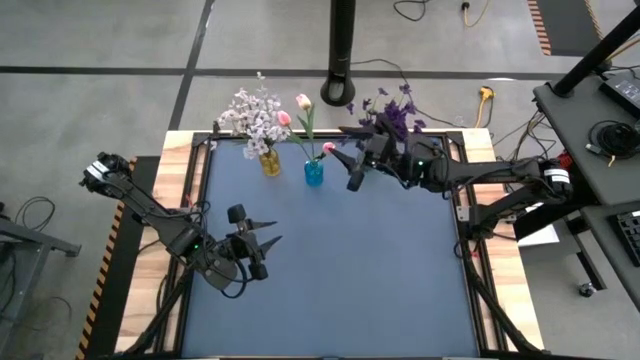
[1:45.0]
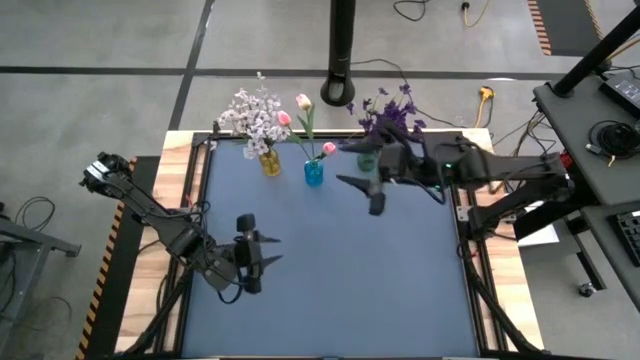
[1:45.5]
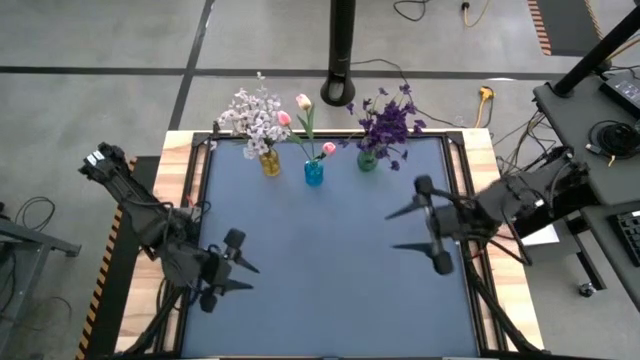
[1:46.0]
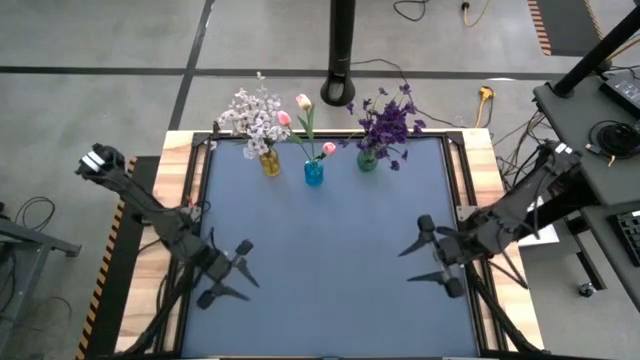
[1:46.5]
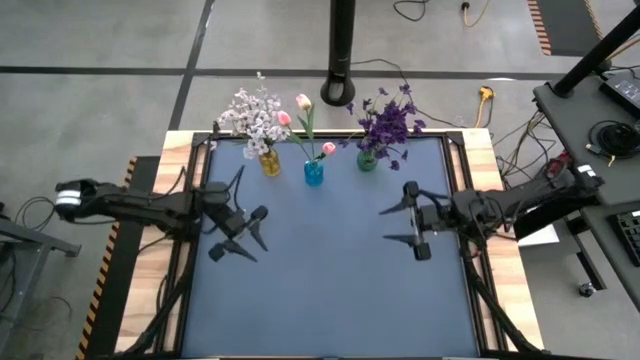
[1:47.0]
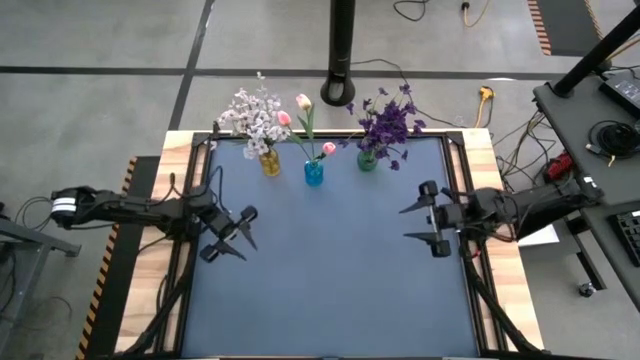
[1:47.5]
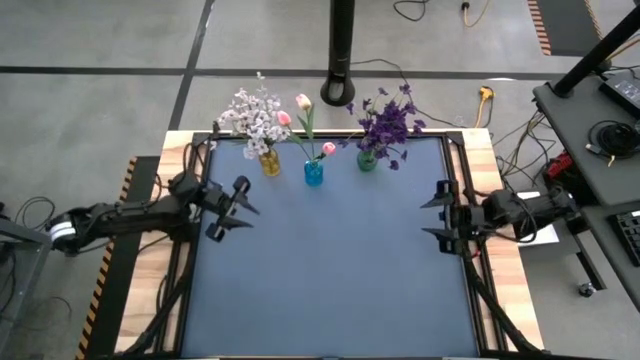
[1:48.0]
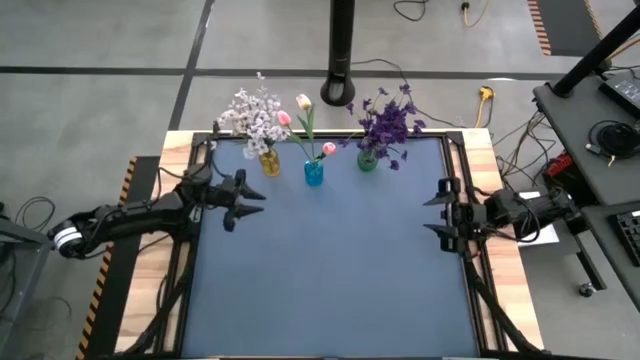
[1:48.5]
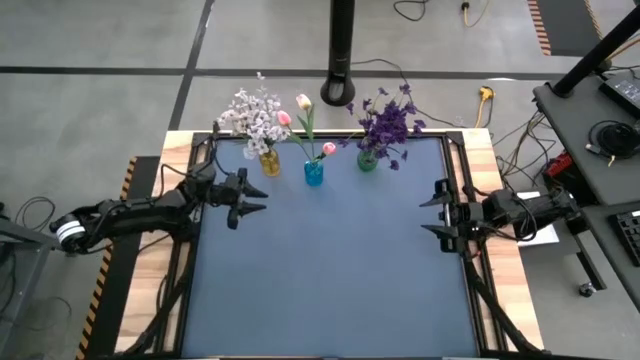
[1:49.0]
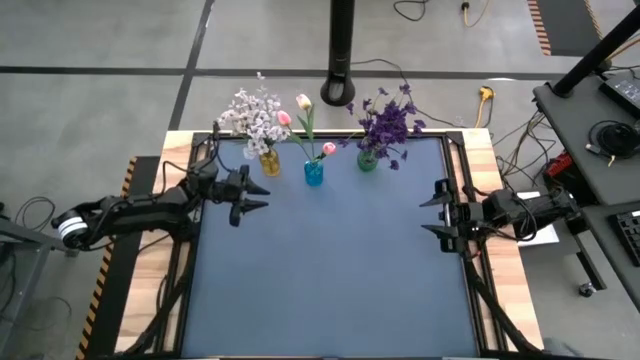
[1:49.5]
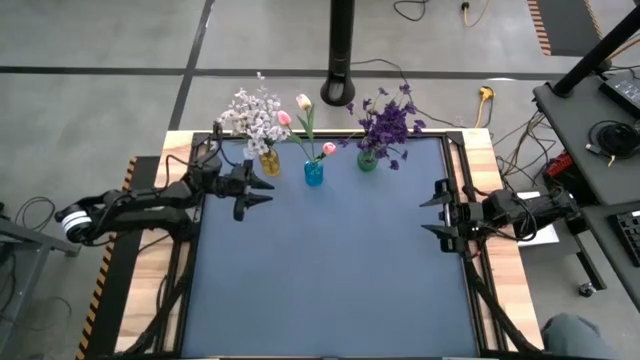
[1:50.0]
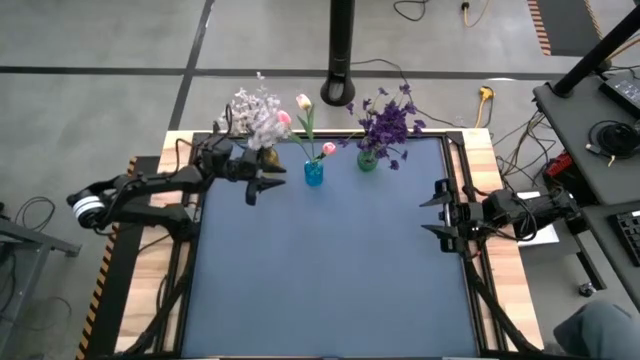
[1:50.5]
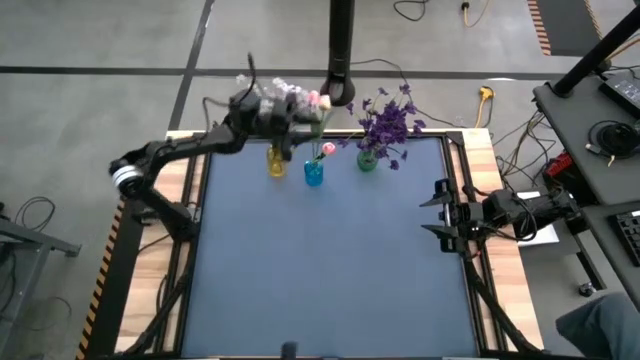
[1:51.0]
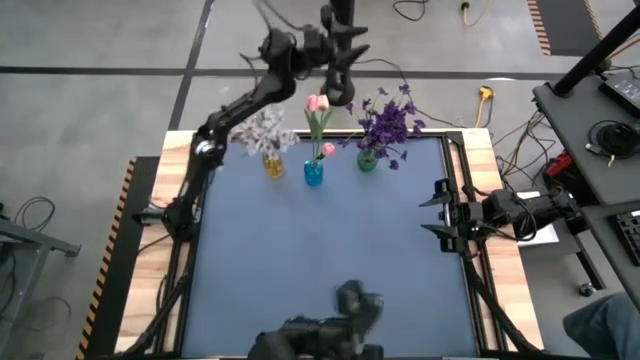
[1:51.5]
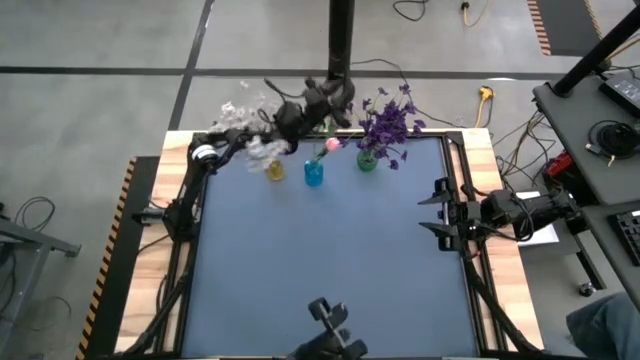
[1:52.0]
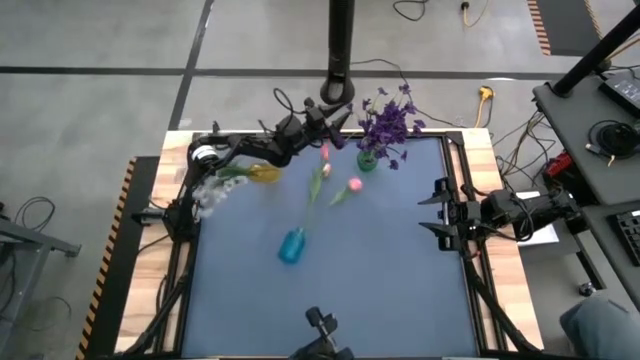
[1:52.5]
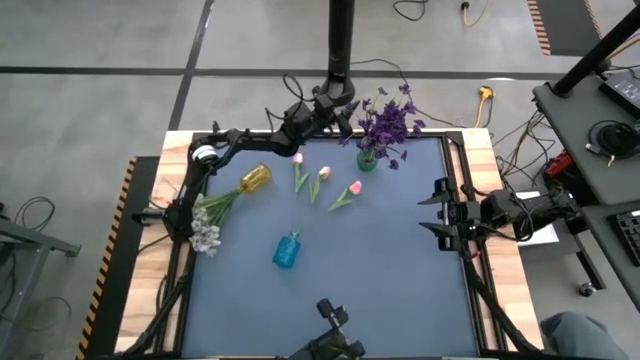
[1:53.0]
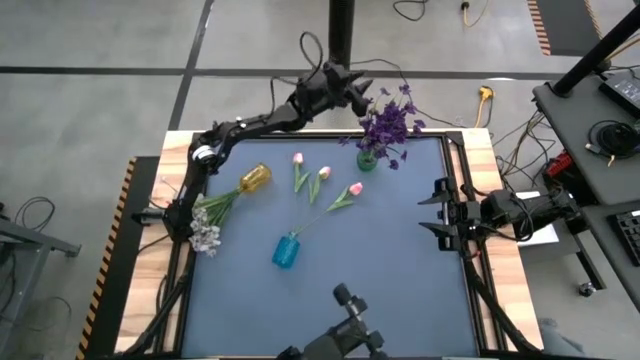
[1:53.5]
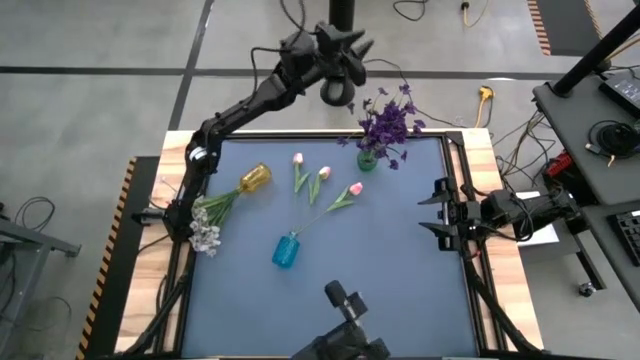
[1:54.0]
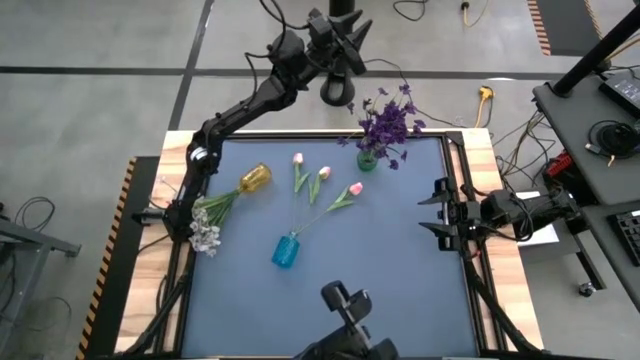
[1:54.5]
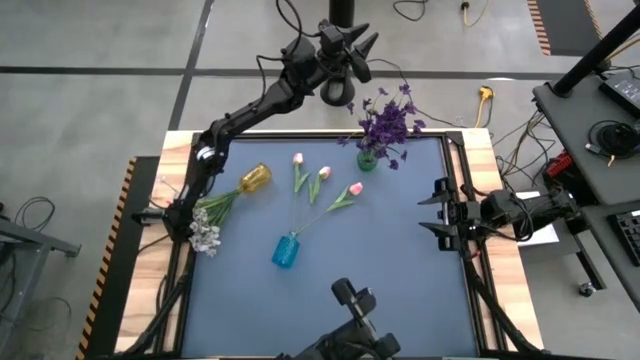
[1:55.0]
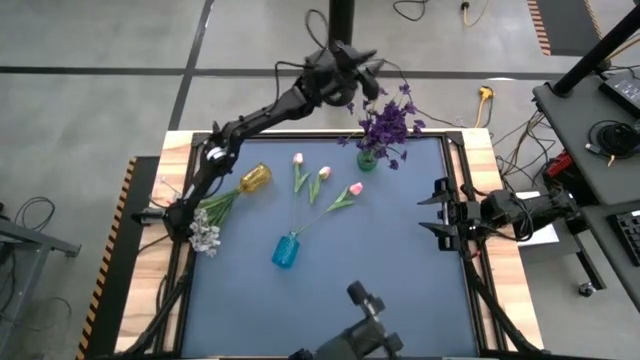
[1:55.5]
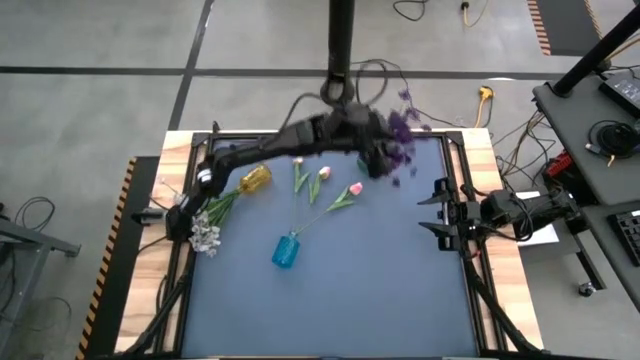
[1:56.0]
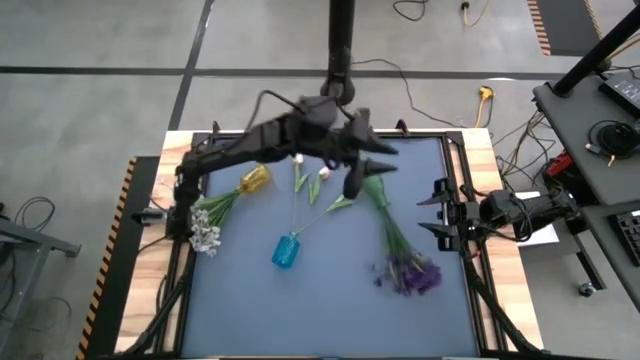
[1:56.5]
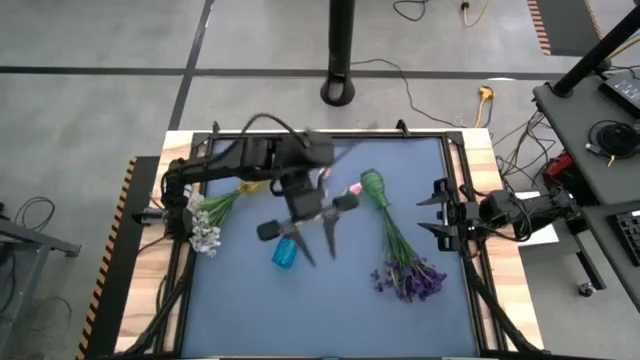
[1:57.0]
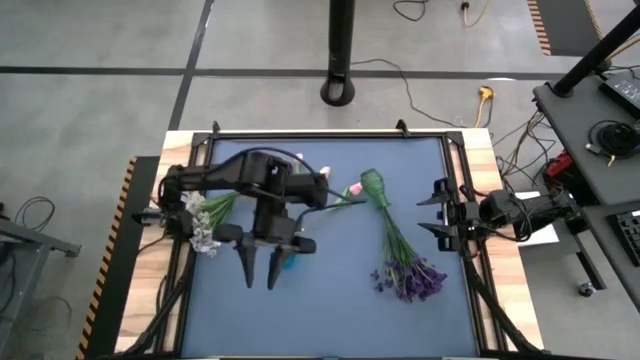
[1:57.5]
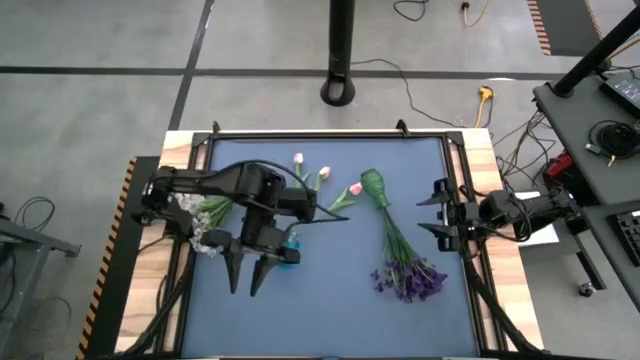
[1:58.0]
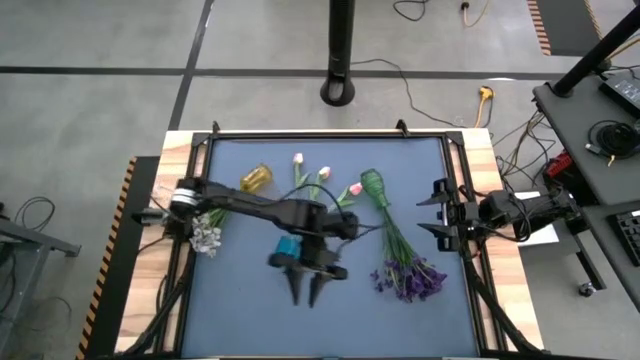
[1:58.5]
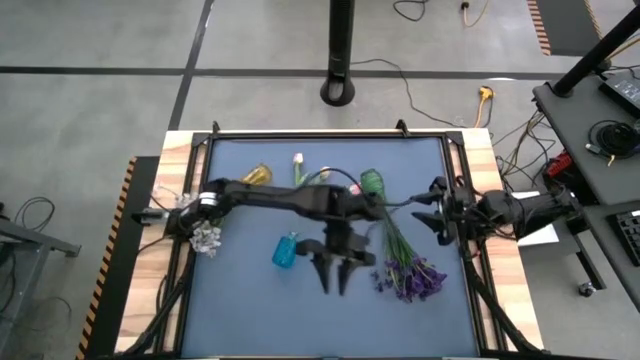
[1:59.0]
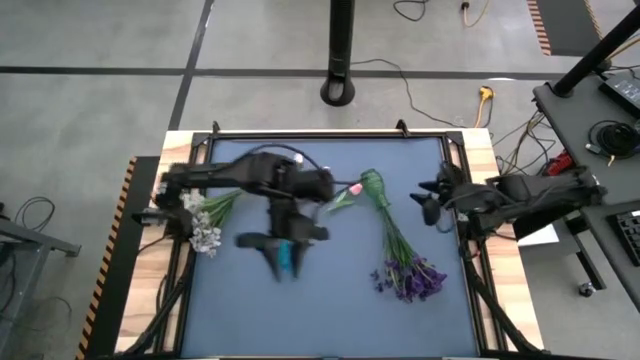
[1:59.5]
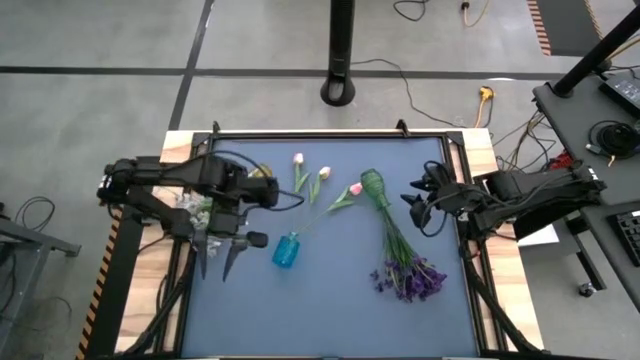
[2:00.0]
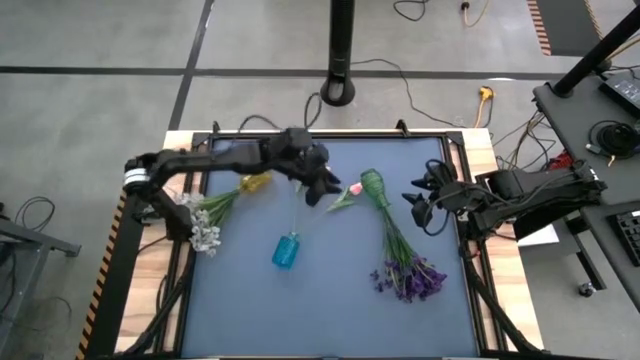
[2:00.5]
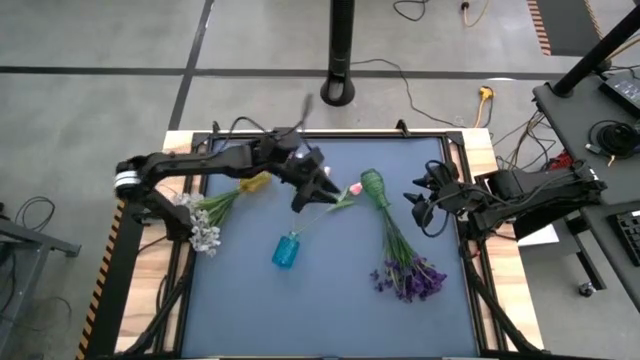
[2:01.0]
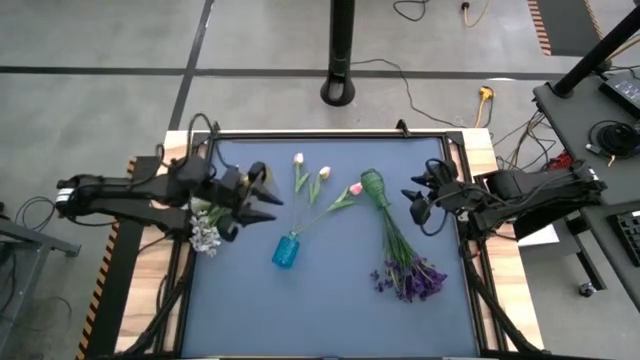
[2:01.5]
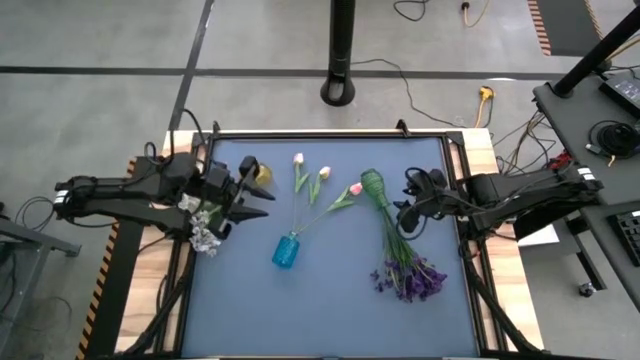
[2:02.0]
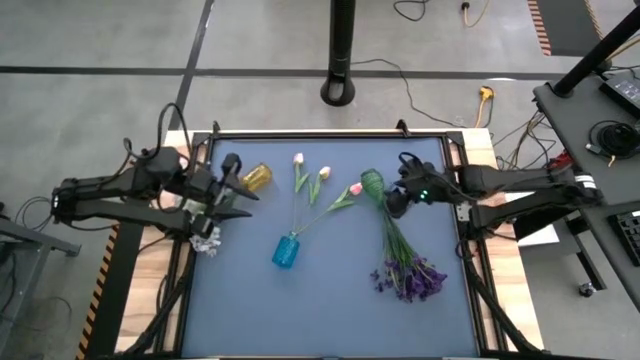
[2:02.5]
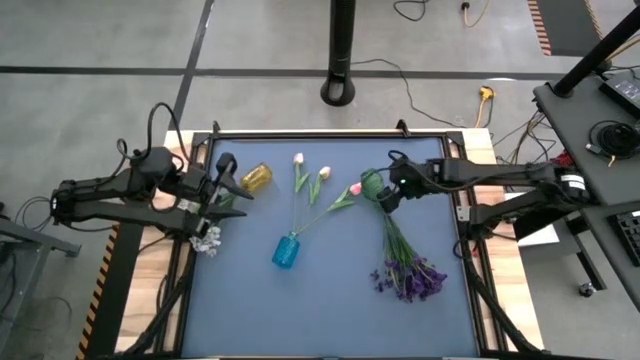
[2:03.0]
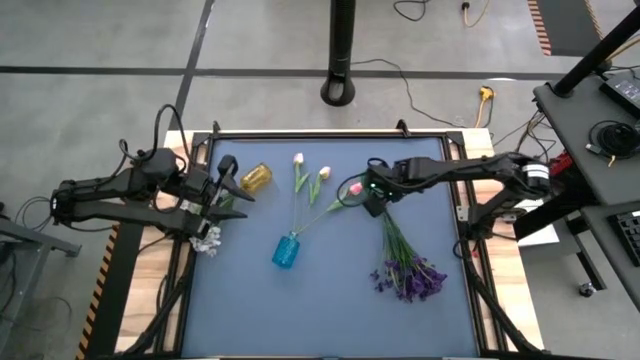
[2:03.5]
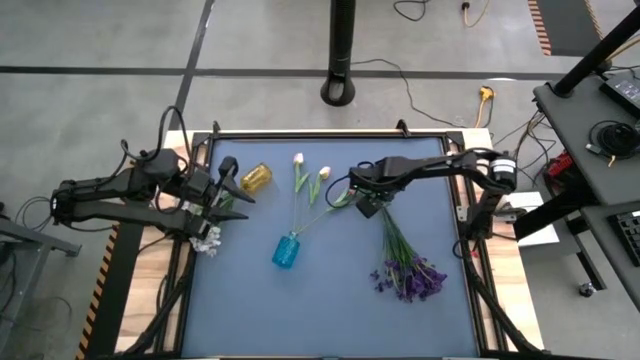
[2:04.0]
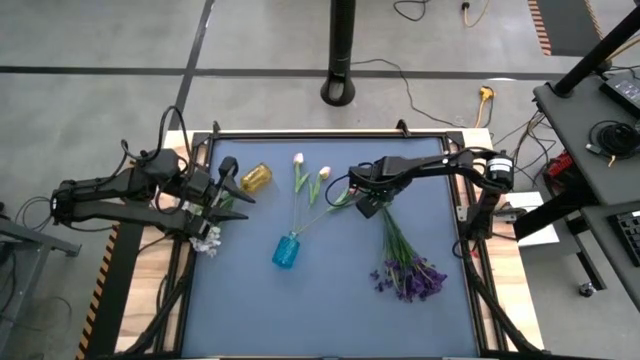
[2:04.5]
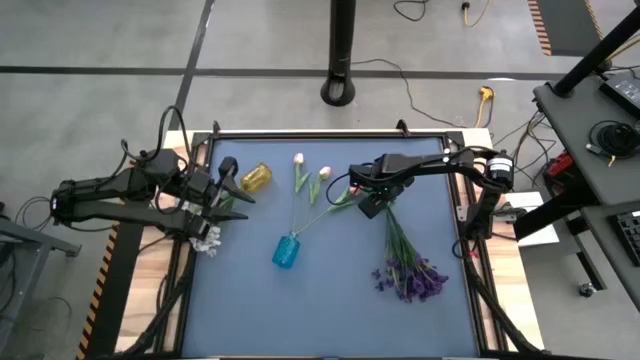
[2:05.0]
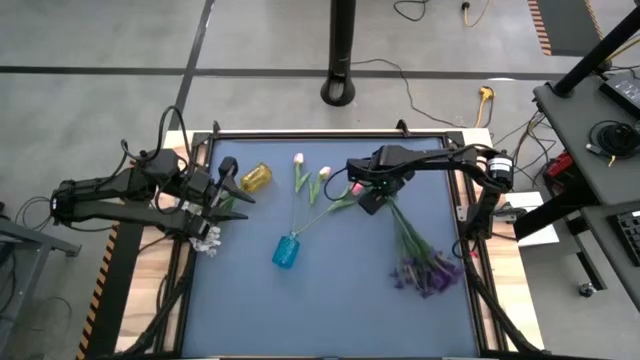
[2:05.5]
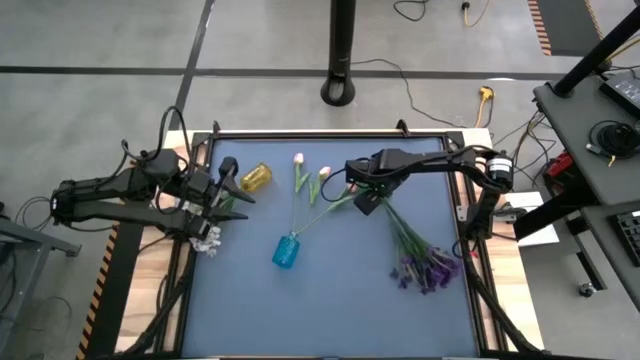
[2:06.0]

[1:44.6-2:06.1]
Task: Sort flowers into vase by color
Adjust the green vase

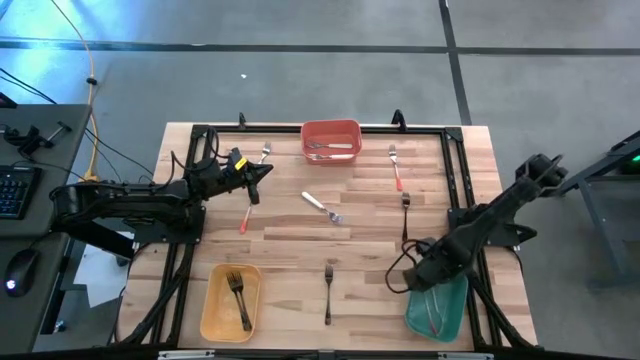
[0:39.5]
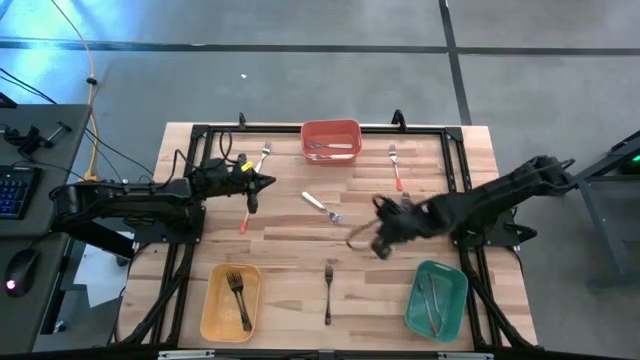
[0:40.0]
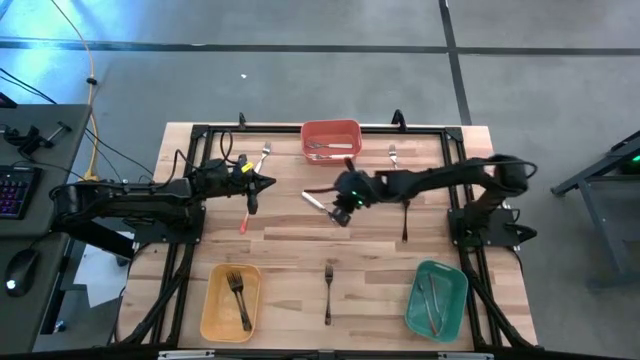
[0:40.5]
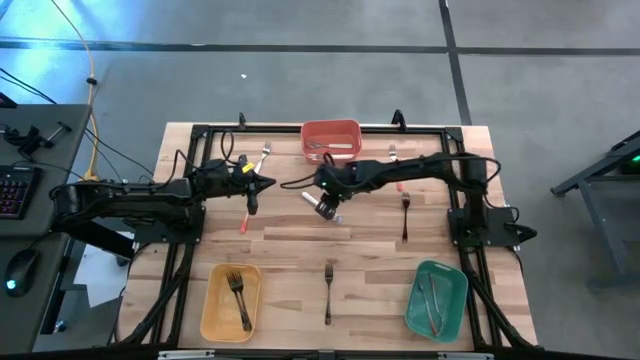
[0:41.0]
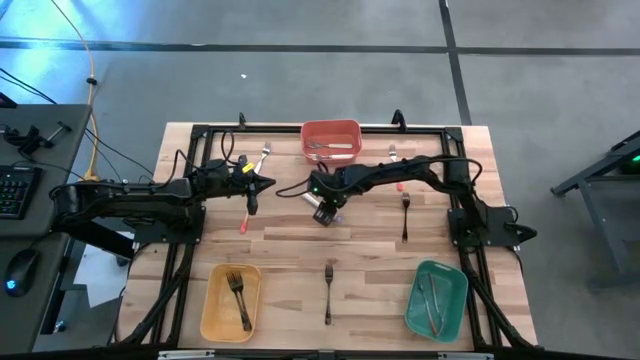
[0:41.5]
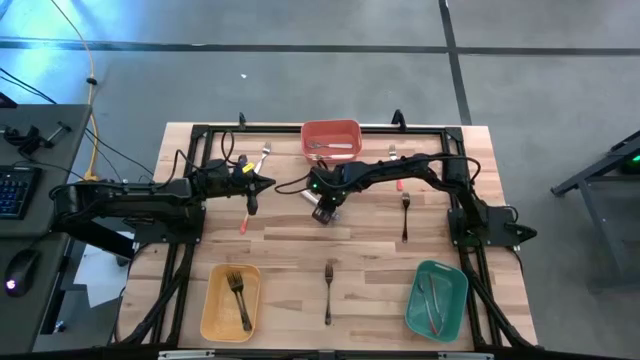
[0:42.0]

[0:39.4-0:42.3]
Task: Sort silverware by color (type)
Put the bottom white fork into the orange bin
